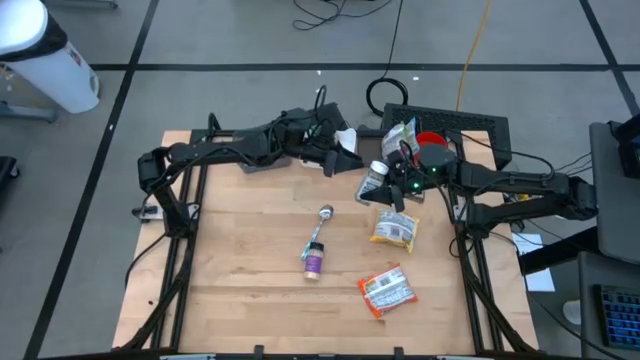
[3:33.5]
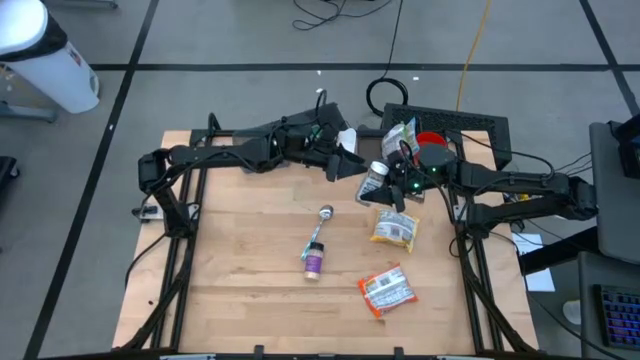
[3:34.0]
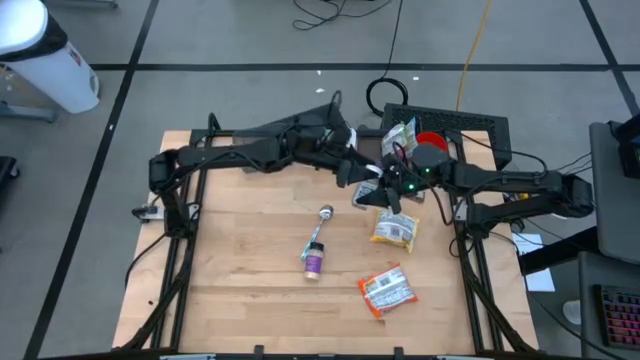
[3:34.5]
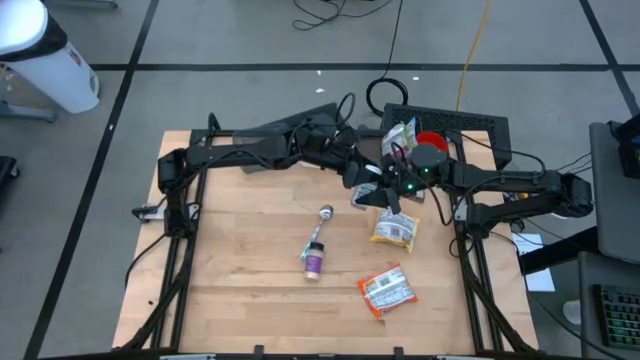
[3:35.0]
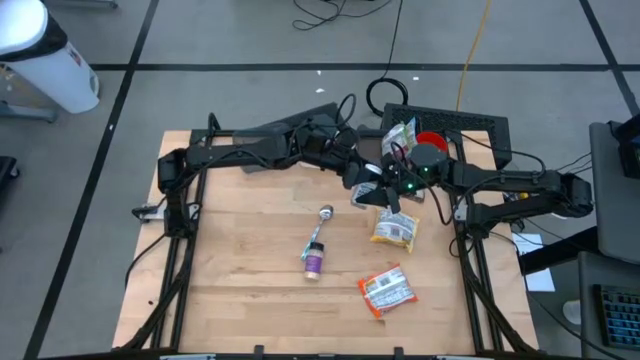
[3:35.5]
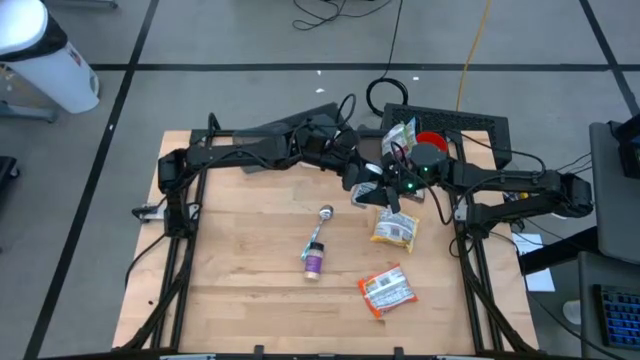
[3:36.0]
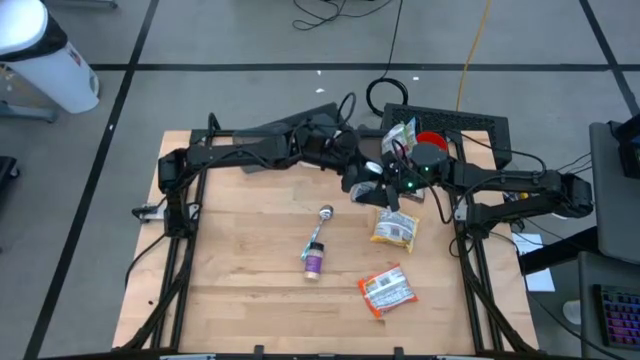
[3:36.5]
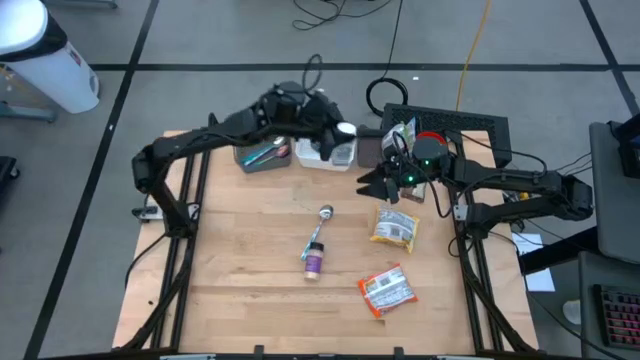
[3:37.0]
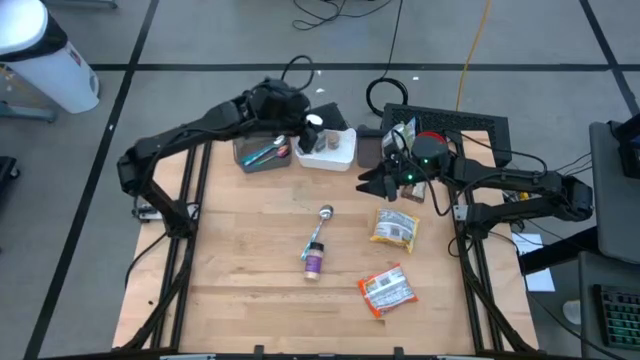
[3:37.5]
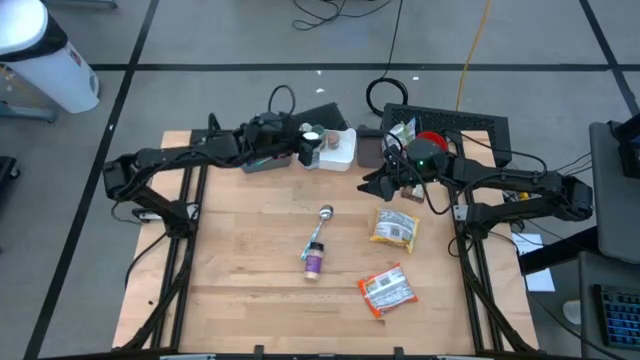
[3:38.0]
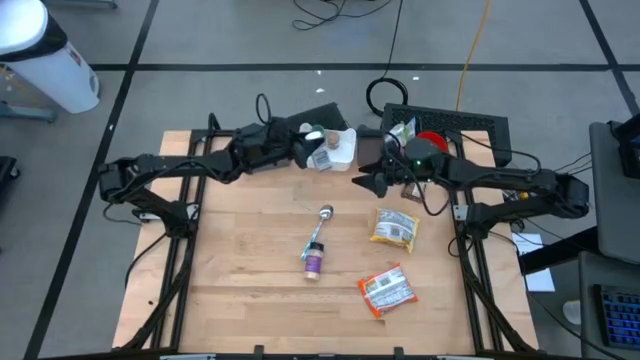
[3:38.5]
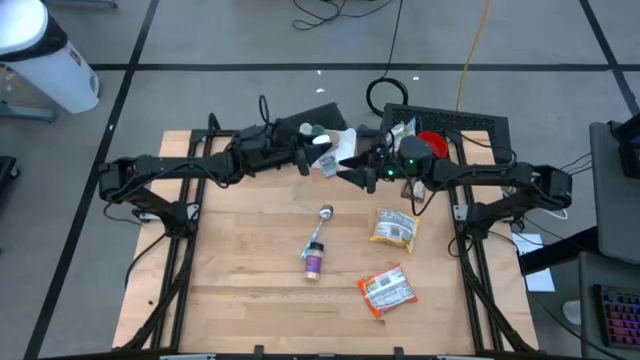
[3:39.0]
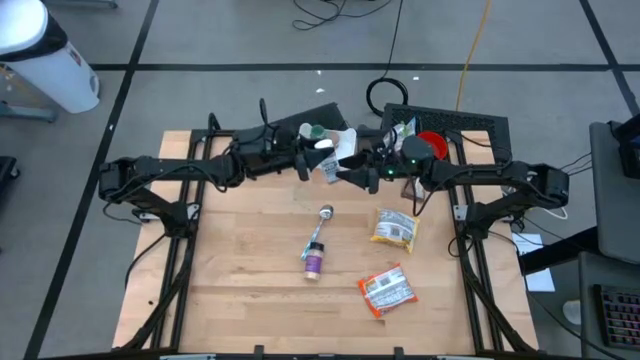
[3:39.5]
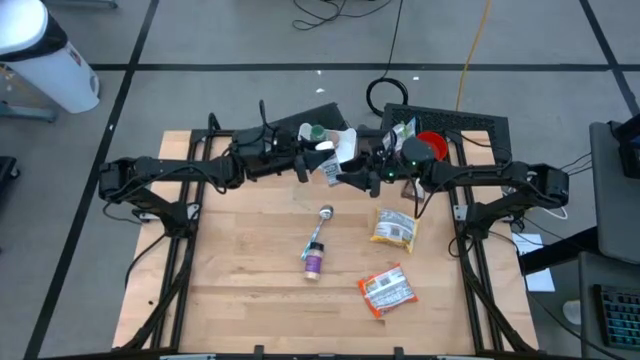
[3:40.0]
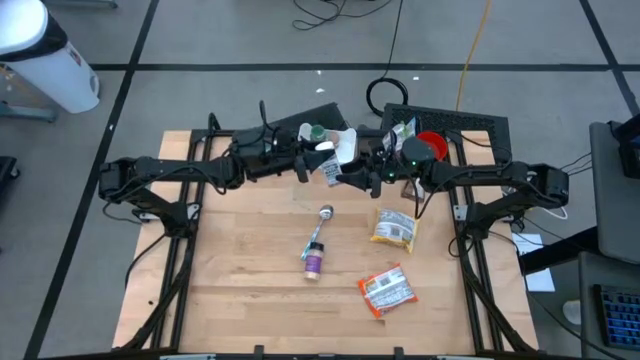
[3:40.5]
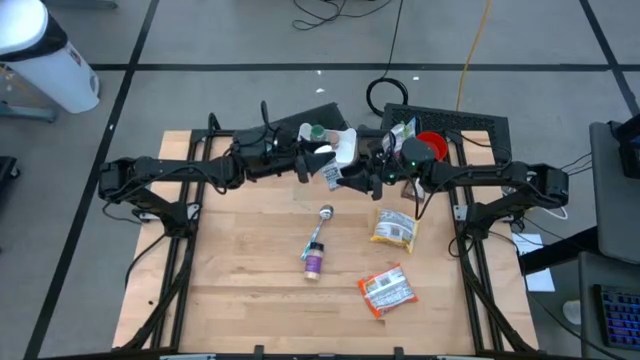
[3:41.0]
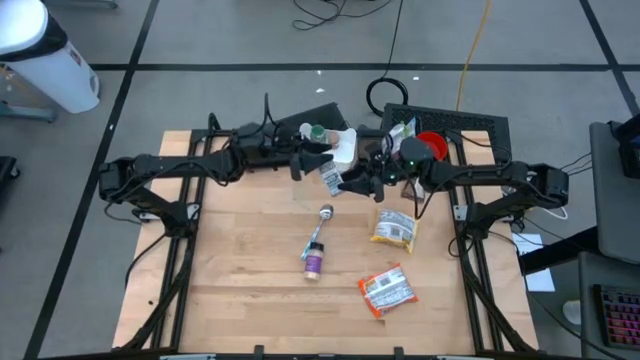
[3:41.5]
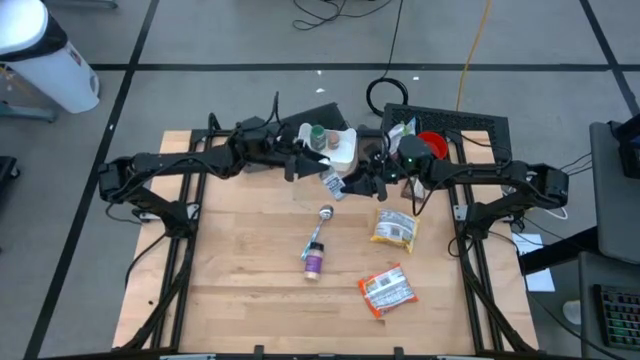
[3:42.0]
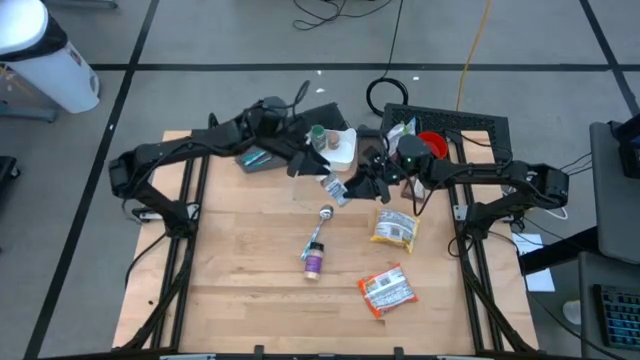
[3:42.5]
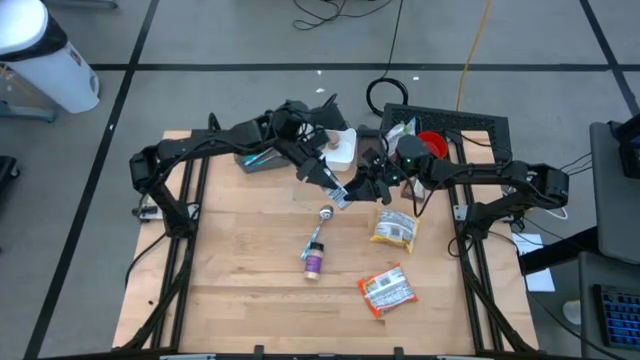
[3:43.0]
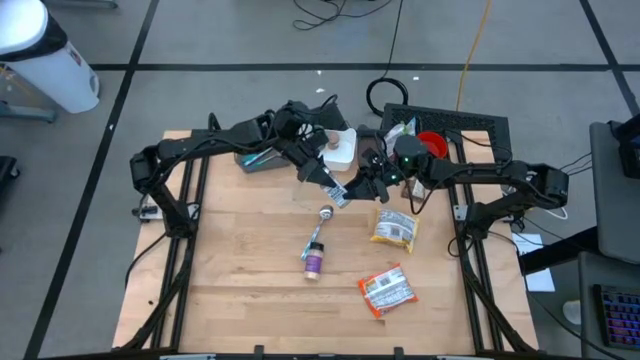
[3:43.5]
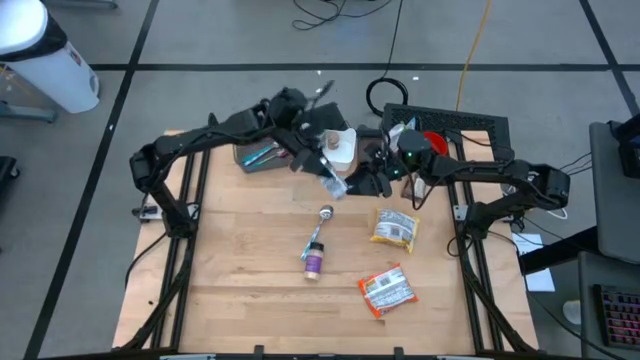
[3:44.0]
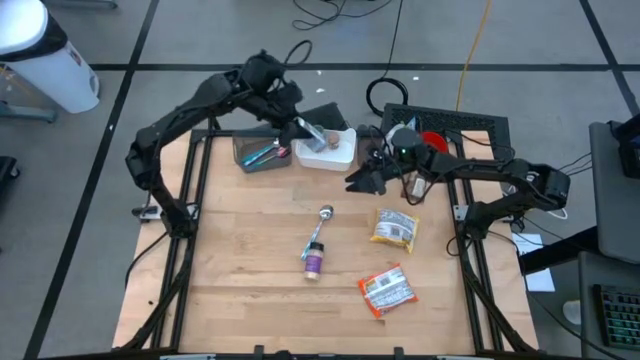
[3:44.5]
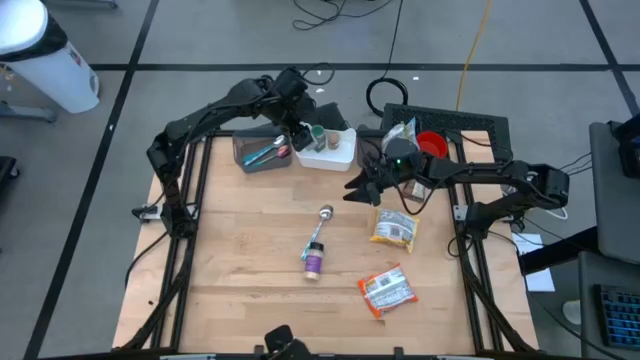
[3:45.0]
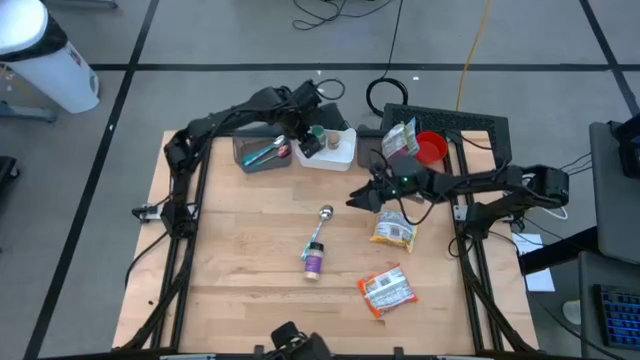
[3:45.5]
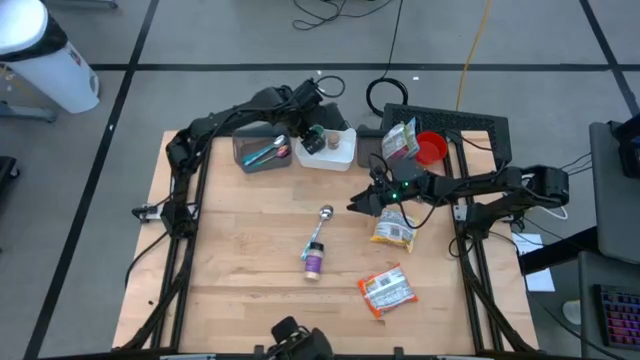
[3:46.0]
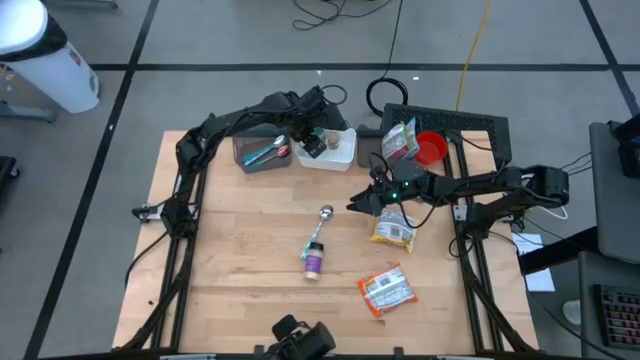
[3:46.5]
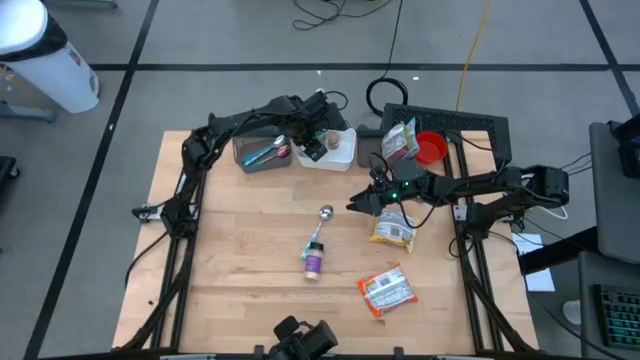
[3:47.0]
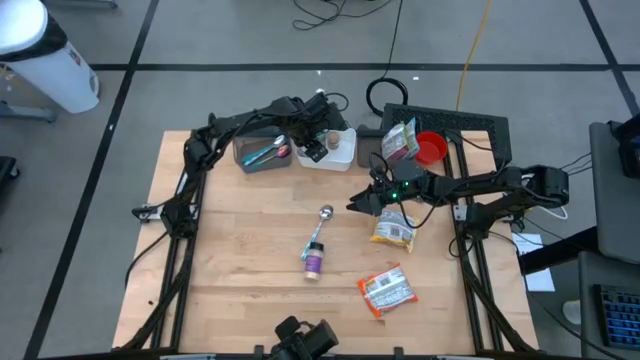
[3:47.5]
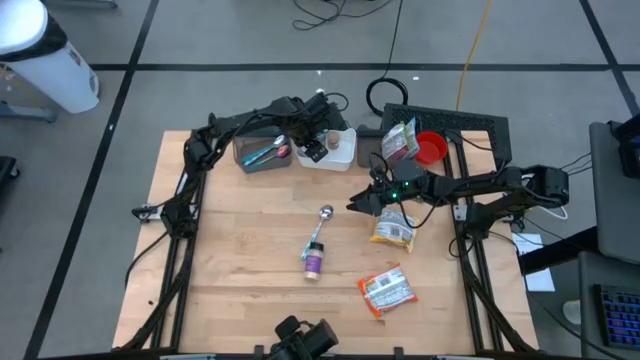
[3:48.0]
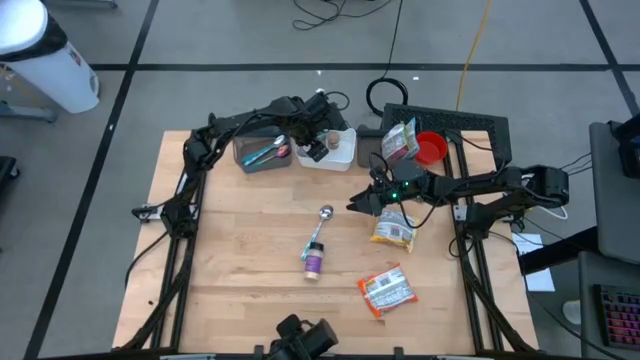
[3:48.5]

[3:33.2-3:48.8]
Task: Pick & Place Food Item
Put the white seasoning bottle into the white bin

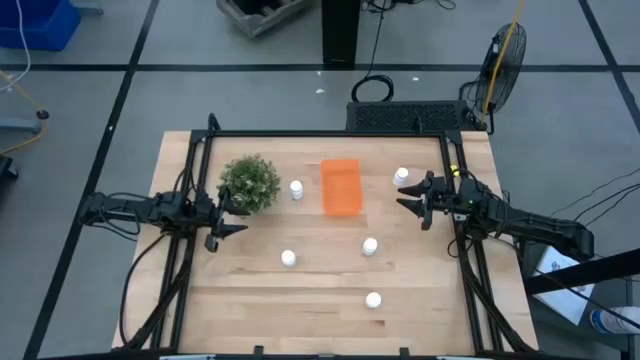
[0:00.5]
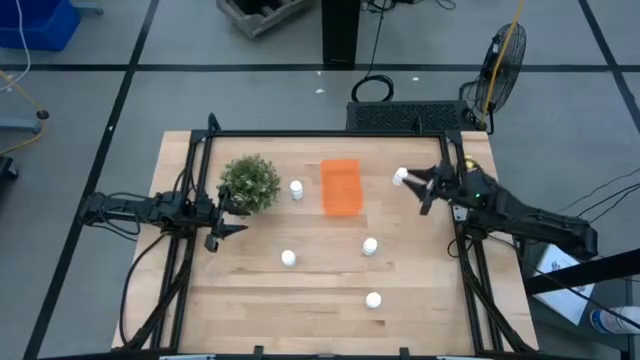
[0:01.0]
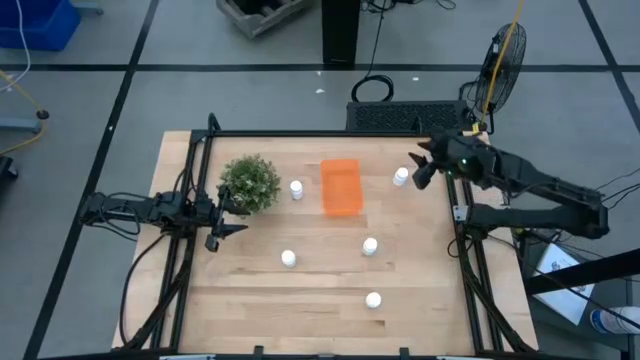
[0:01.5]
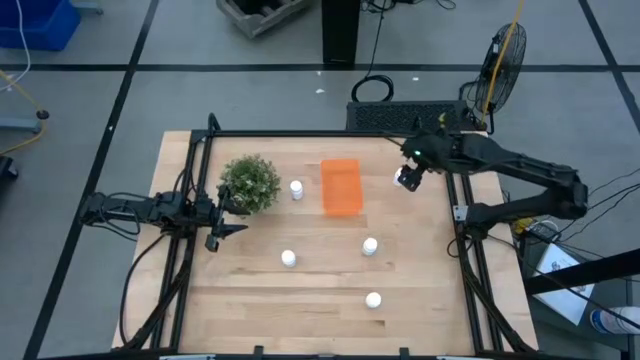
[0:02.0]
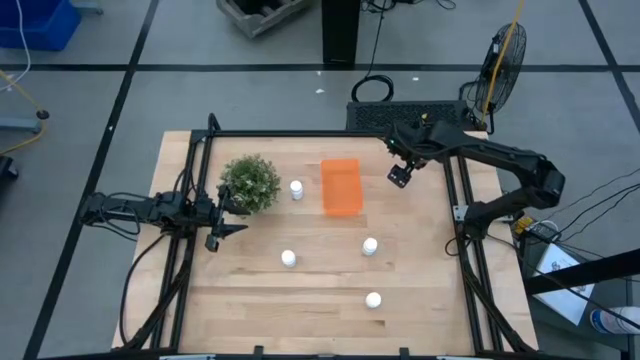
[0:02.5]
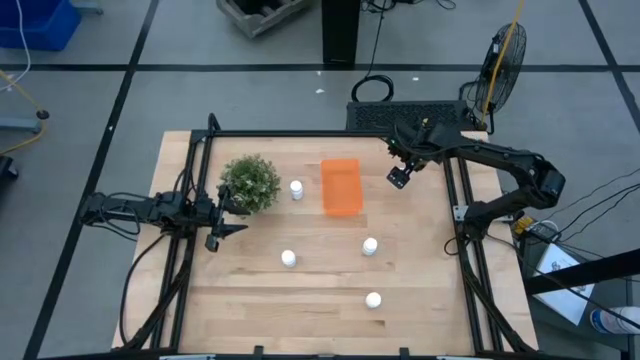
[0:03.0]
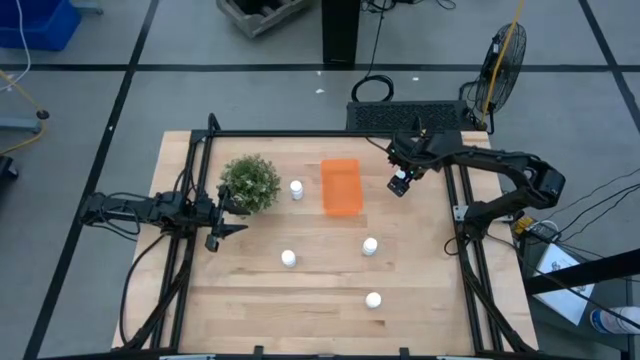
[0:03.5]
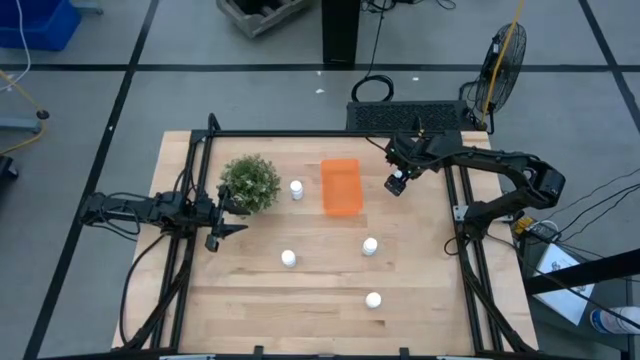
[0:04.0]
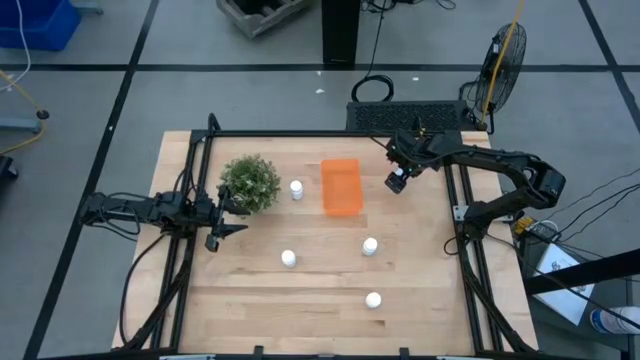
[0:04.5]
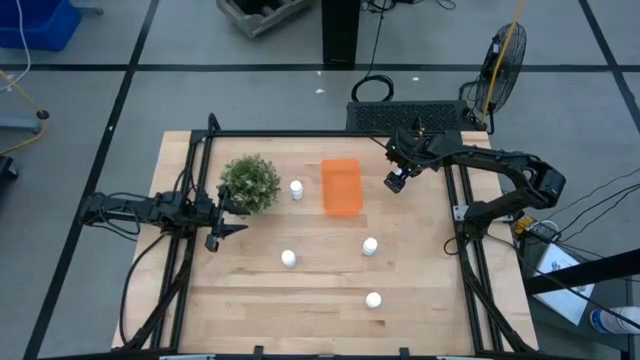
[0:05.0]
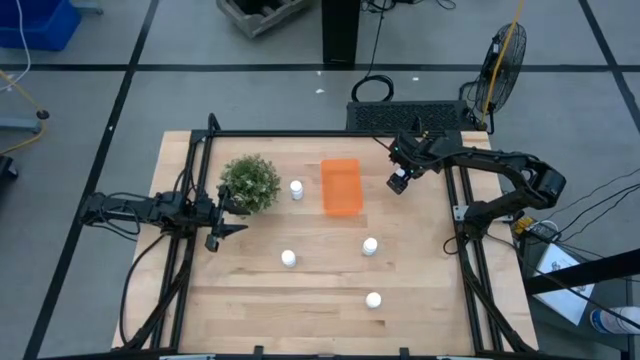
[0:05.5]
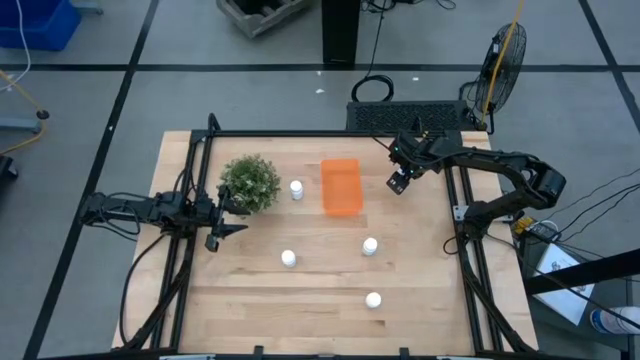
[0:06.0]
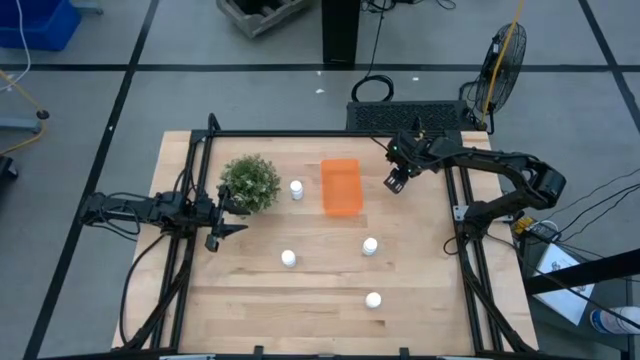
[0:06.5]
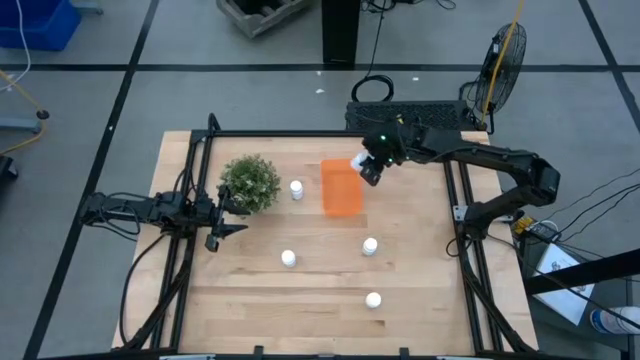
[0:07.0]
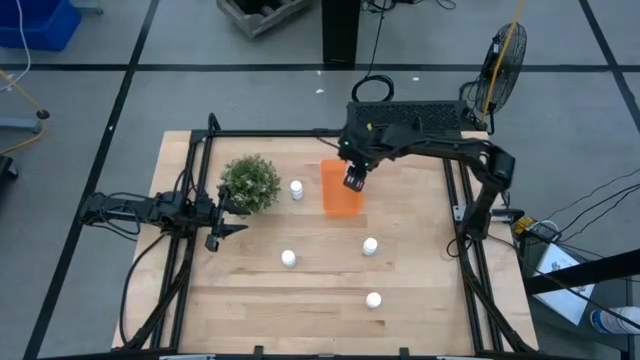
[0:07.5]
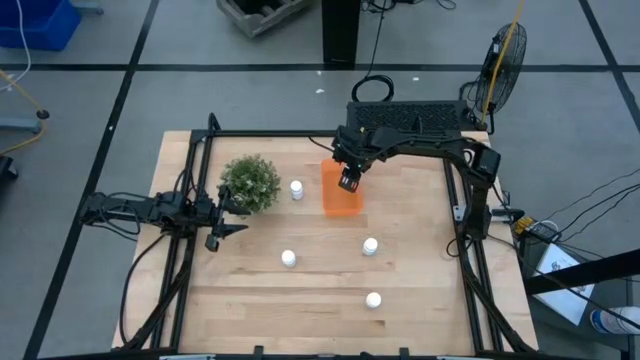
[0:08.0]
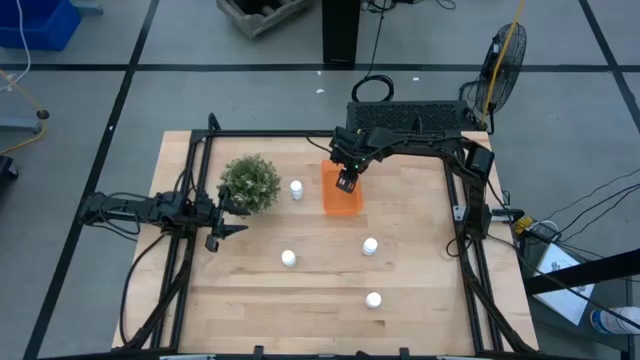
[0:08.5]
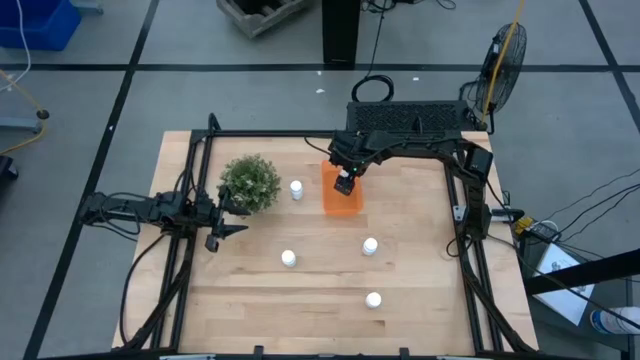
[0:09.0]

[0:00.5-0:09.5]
Task: Pick and place pill bottles into a basket
Put the white pill bottle into the orange bin
